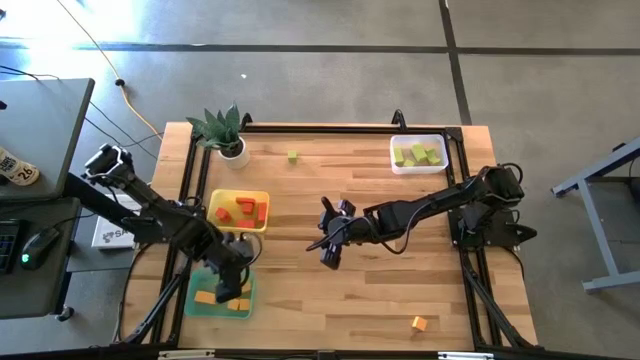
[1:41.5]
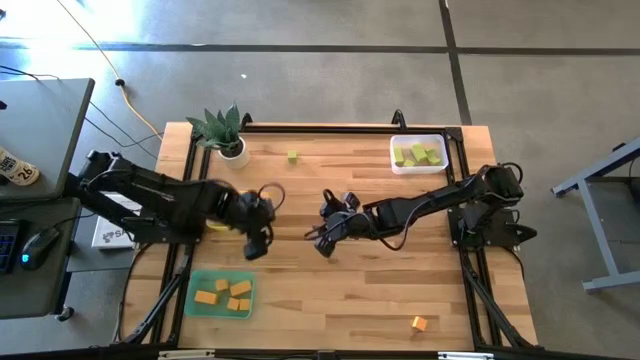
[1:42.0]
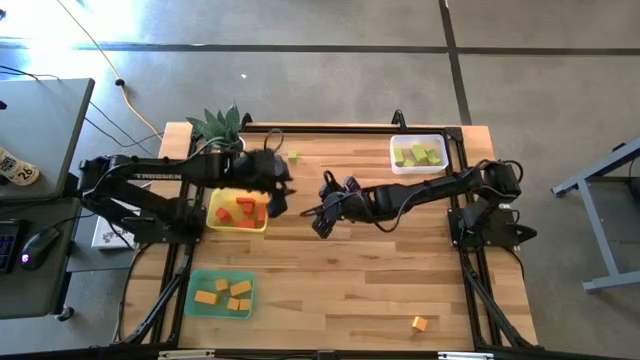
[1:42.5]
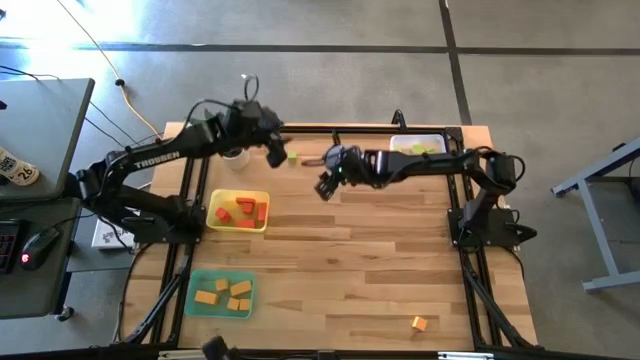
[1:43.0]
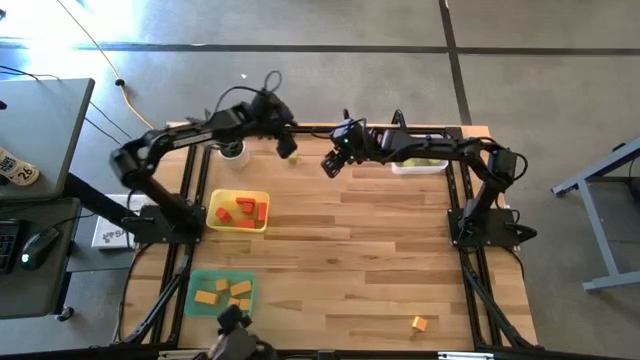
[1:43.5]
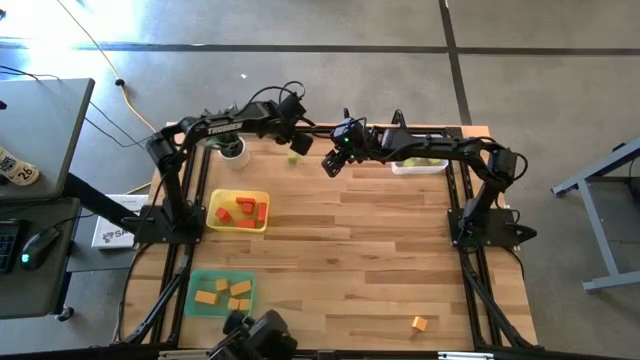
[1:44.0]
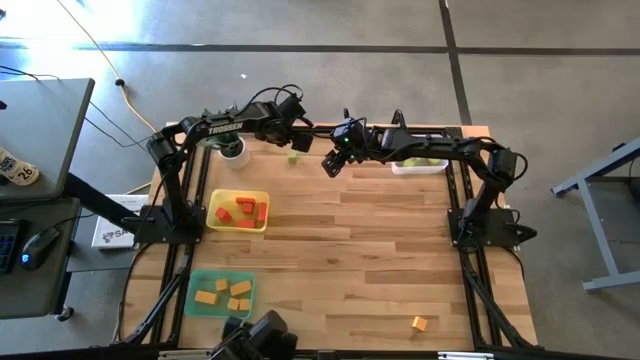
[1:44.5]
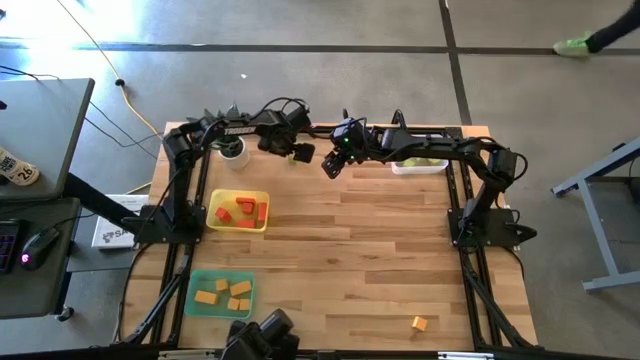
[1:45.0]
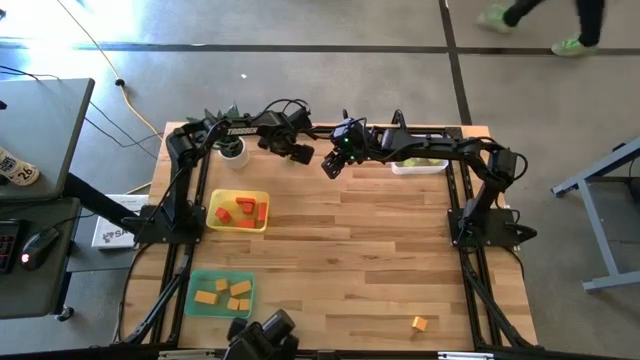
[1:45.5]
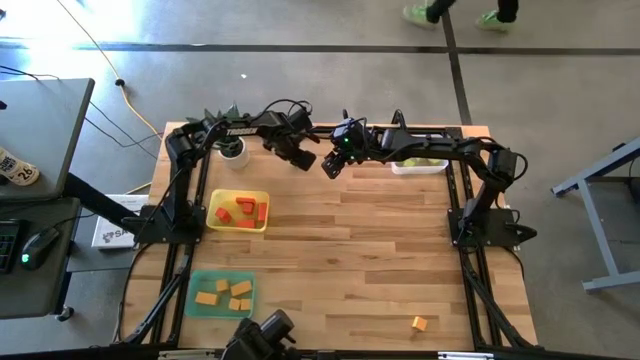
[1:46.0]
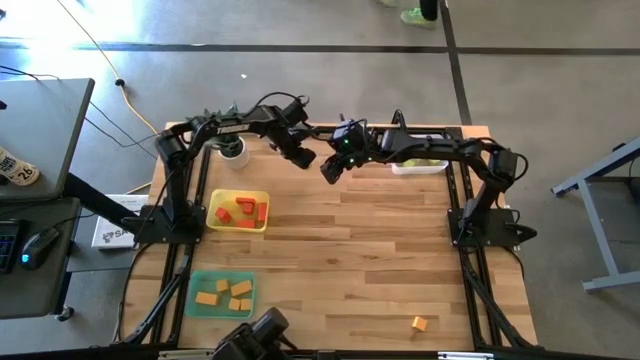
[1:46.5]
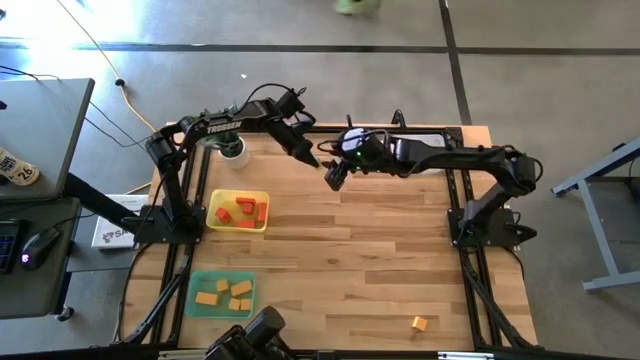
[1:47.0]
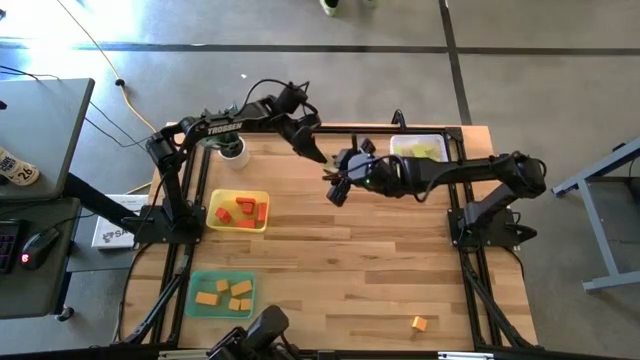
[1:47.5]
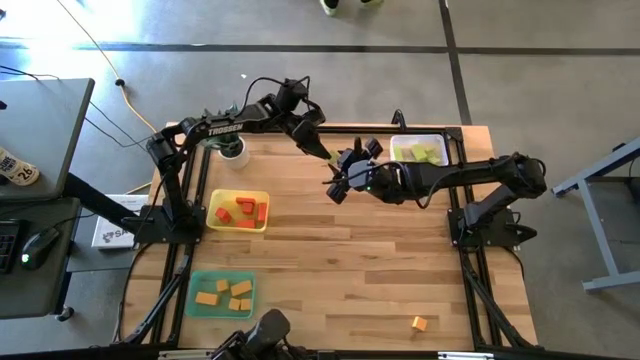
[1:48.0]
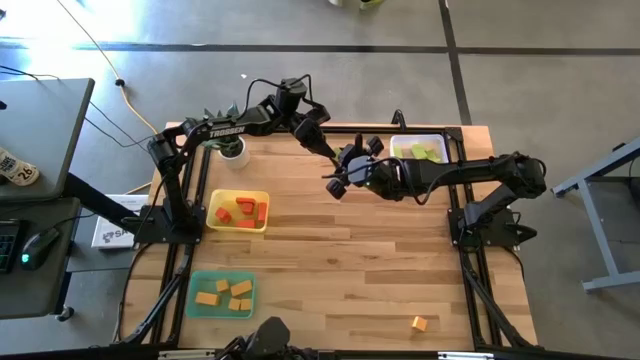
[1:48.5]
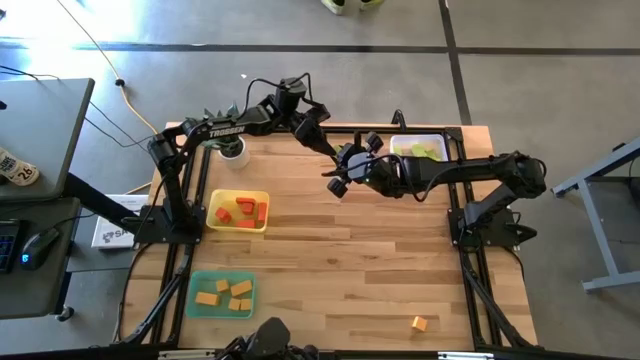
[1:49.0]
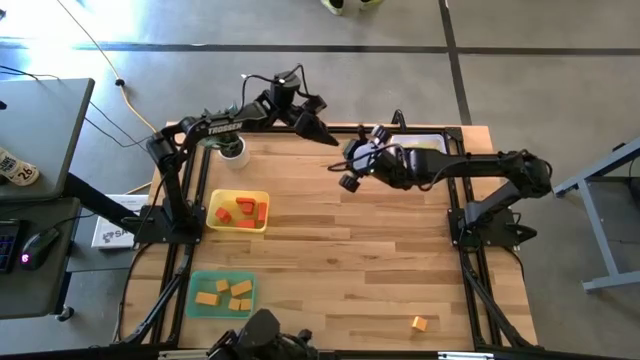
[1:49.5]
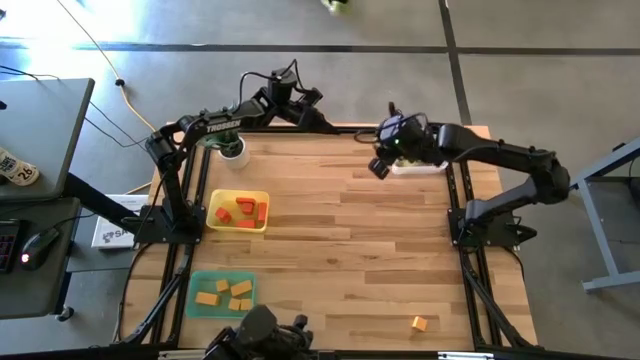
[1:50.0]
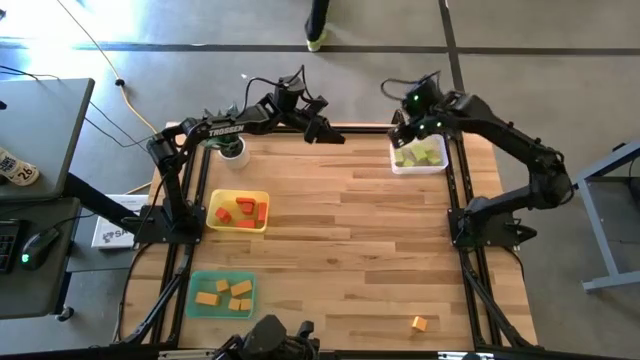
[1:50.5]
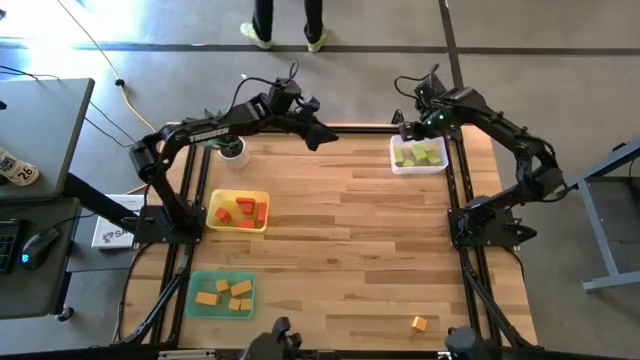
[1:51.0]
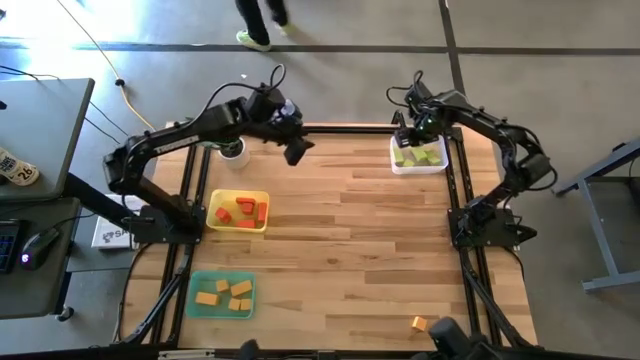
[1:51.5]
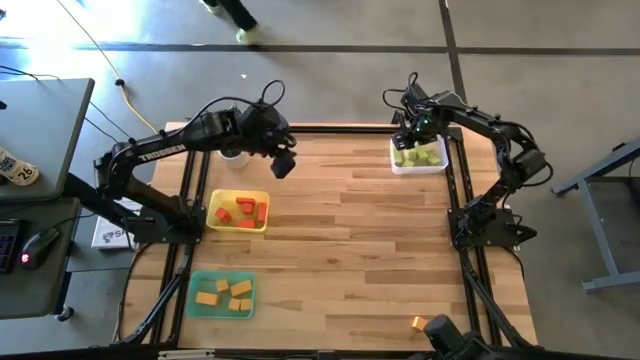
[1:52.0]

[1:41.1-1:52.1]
Task: Sort & place blocks by color
Put the green block into the white bin

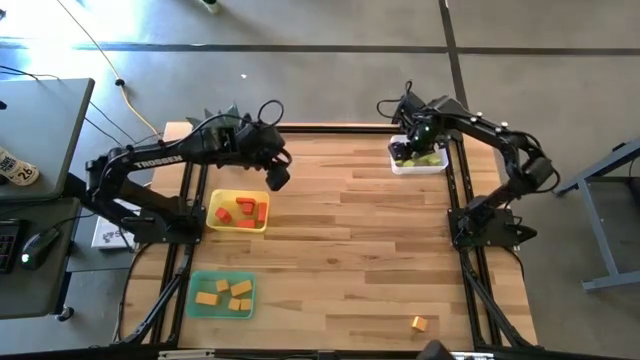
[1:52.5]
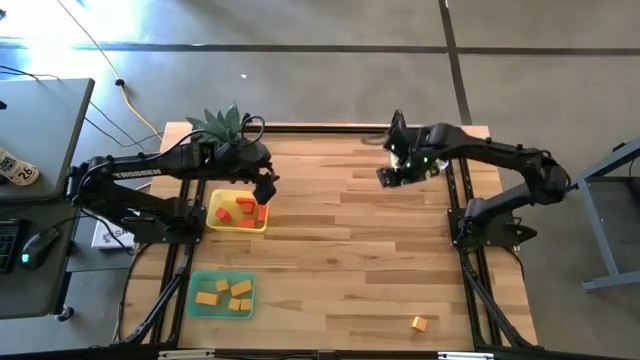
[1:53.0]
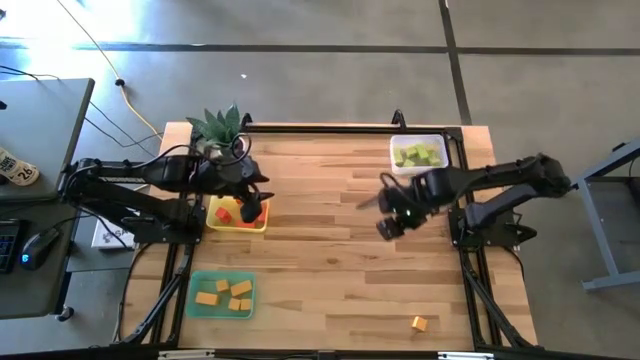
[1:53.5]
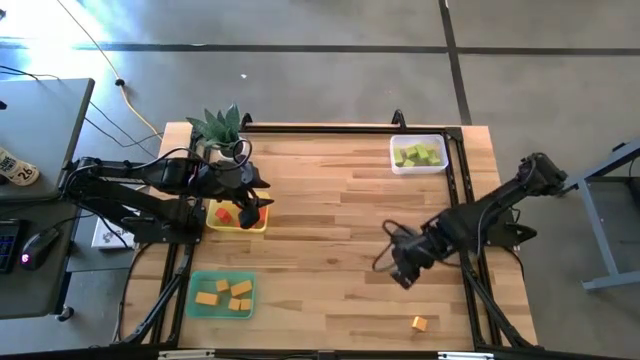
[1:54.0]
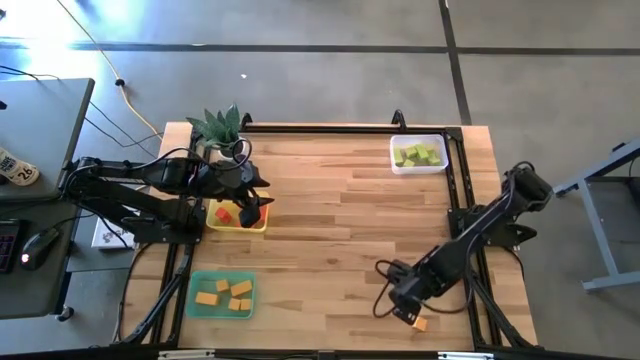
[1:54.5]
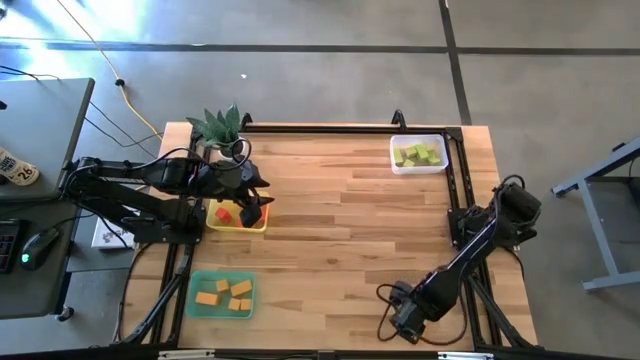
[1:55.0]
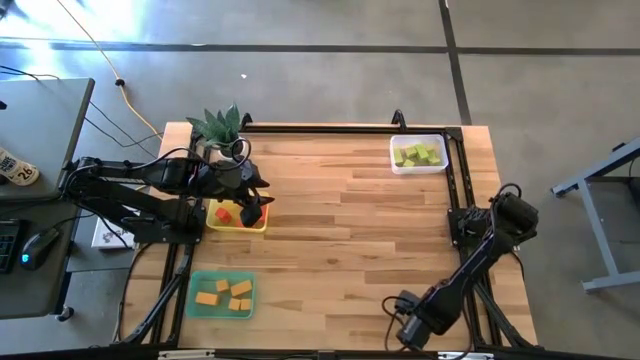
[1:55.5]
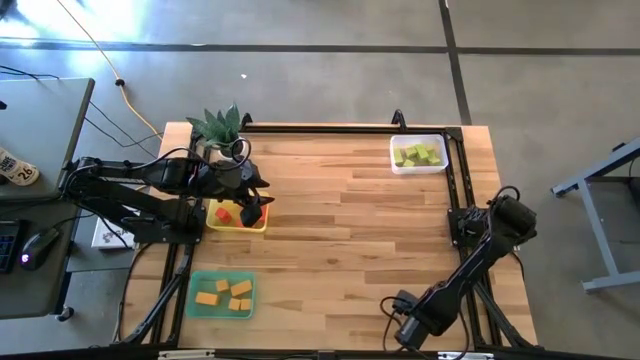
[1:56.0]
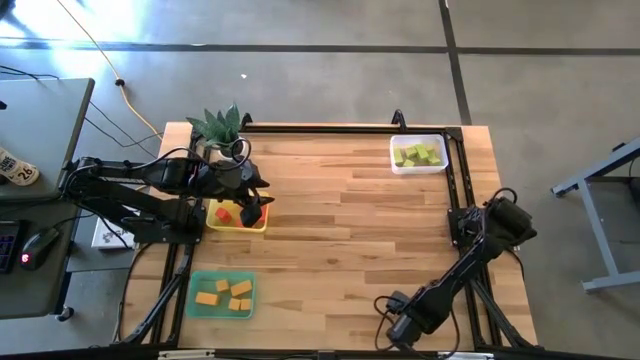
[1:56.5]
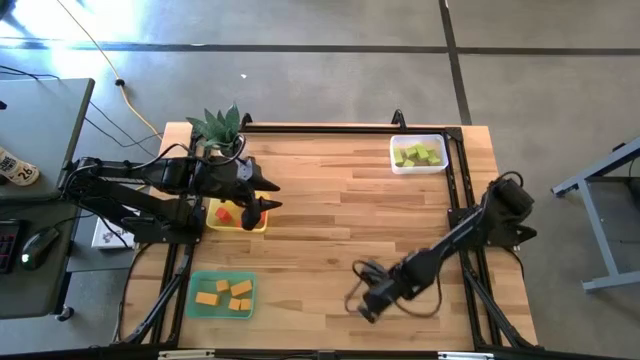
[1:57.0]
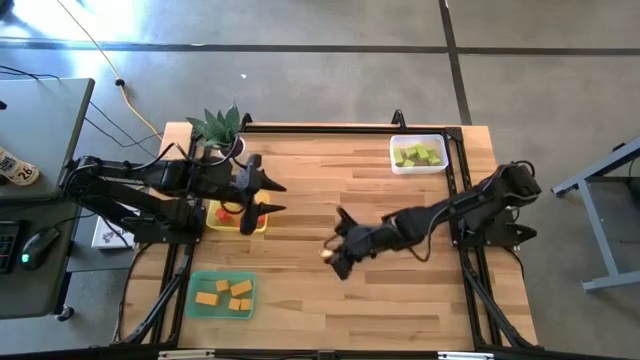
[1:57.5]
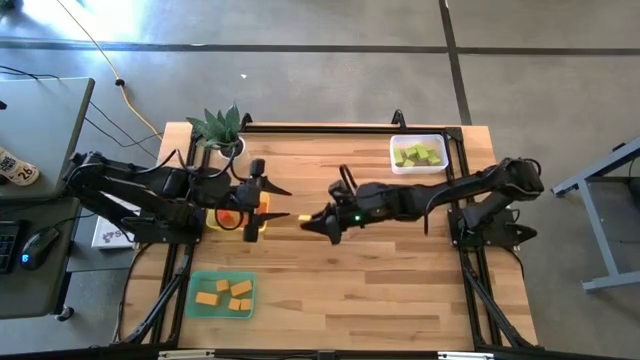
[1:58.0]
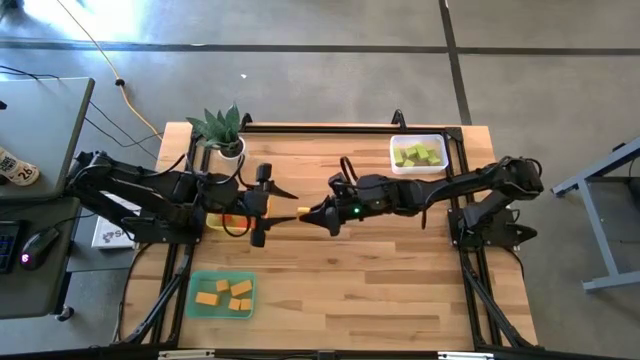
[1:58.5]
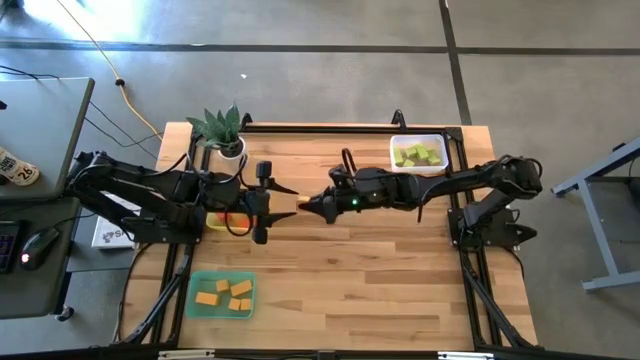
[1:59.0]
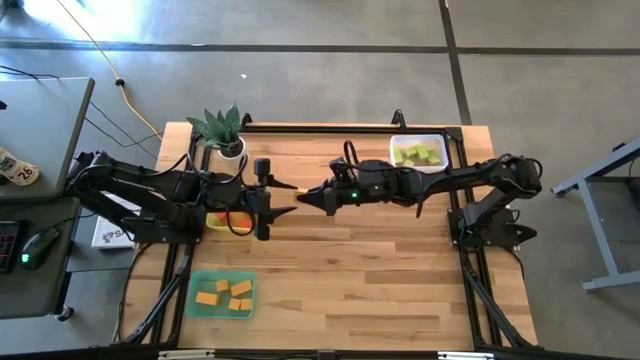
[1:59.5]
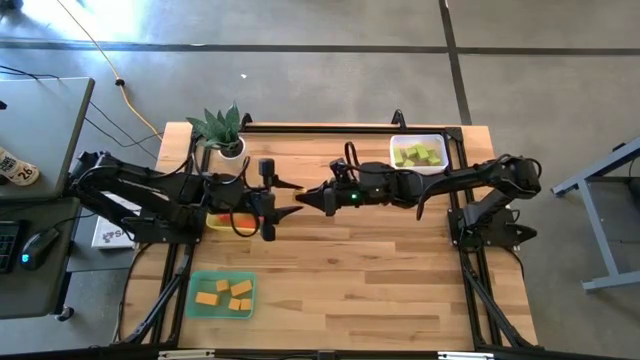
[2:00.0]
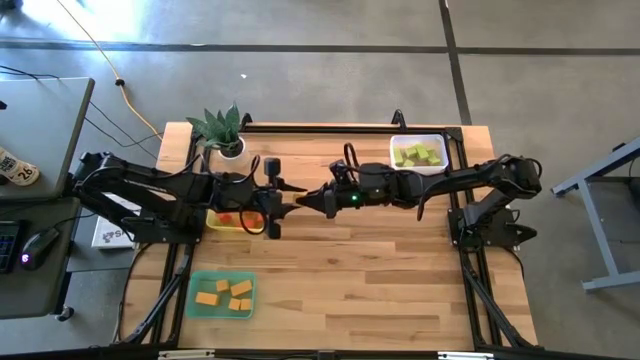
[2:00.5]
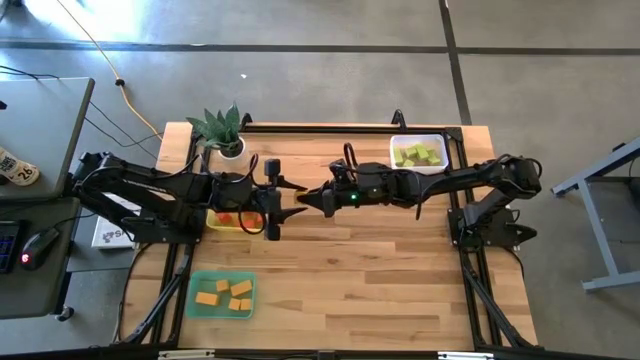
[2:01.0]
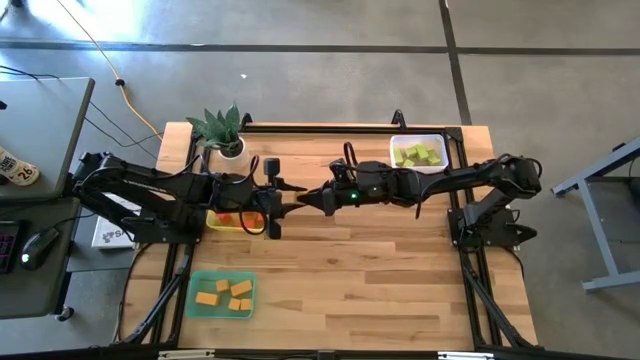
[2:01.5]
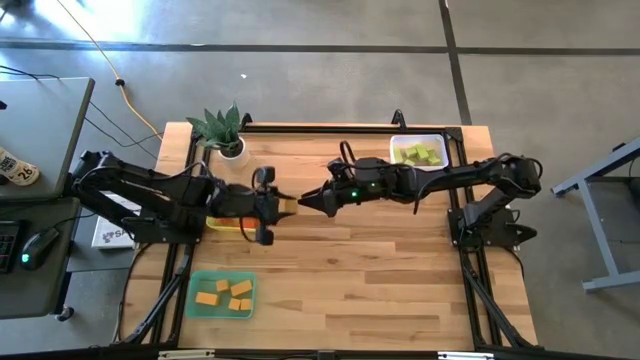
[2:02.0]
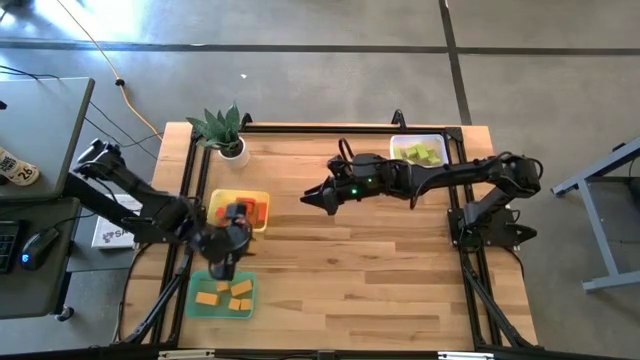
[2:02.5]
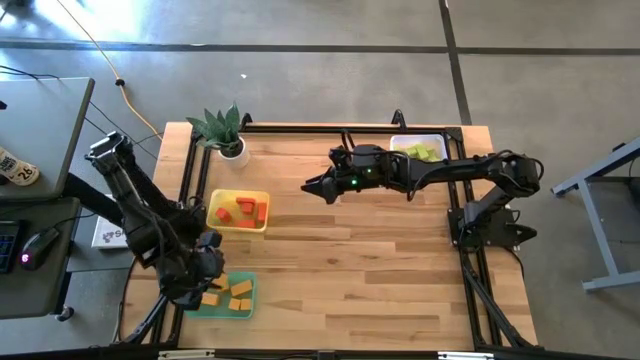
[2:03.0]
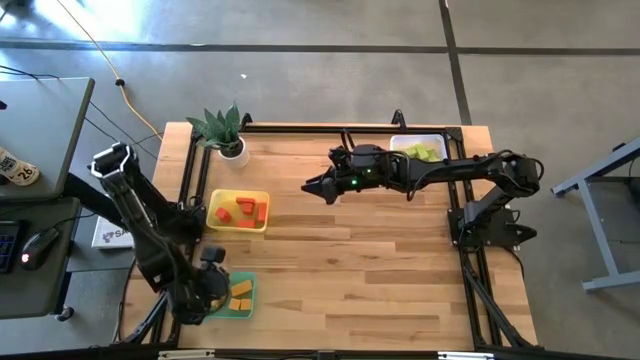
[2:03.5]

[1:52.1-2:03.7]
Put the yellow block into the green bin
